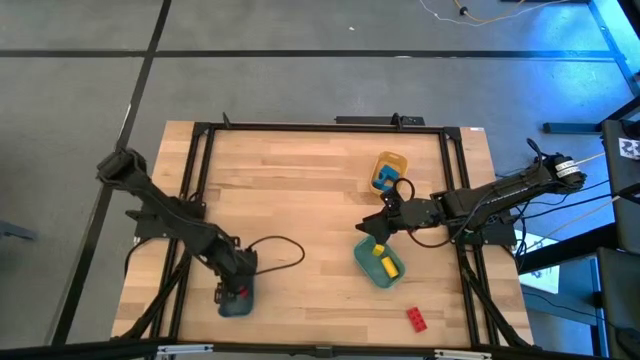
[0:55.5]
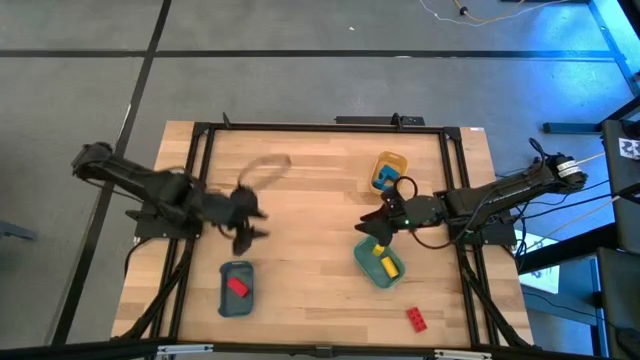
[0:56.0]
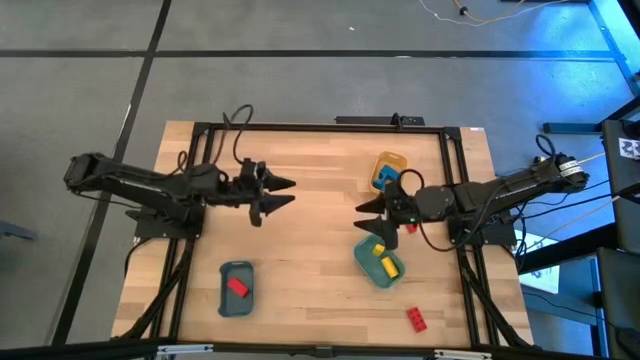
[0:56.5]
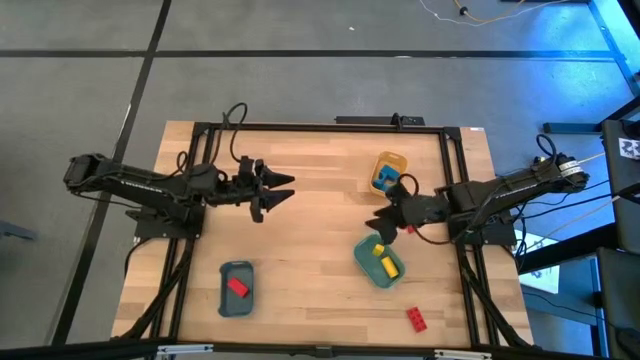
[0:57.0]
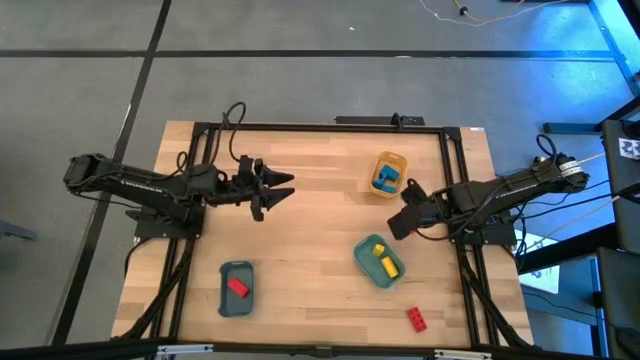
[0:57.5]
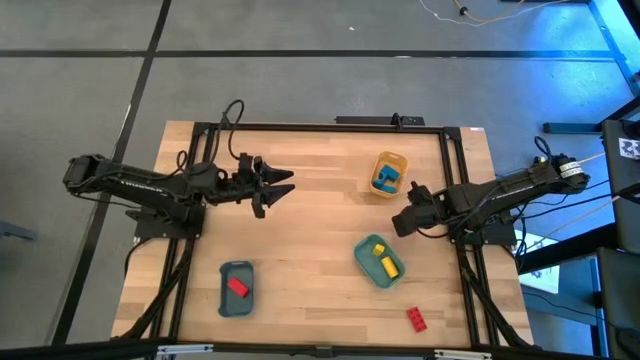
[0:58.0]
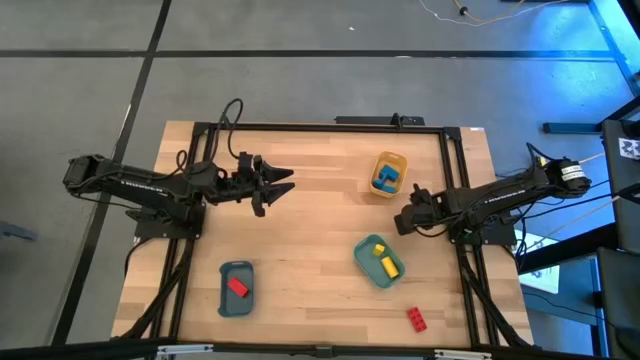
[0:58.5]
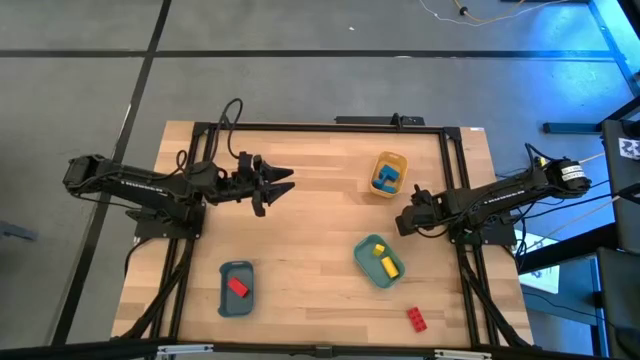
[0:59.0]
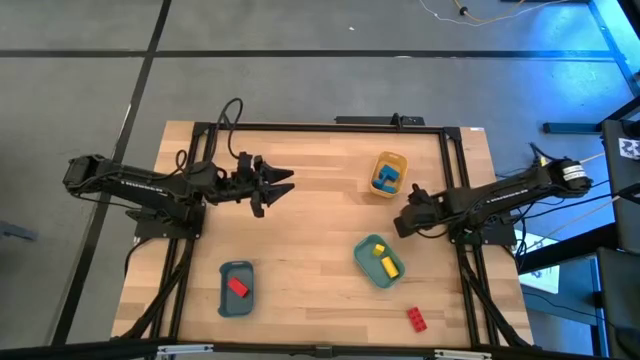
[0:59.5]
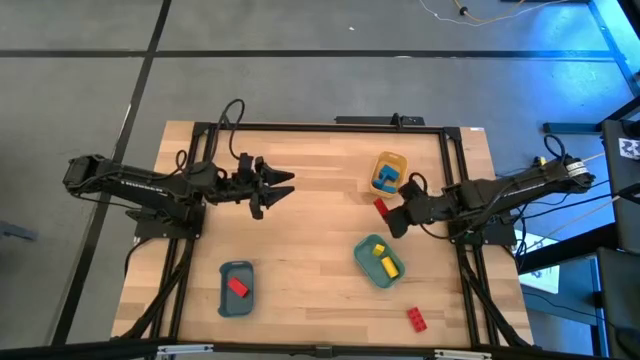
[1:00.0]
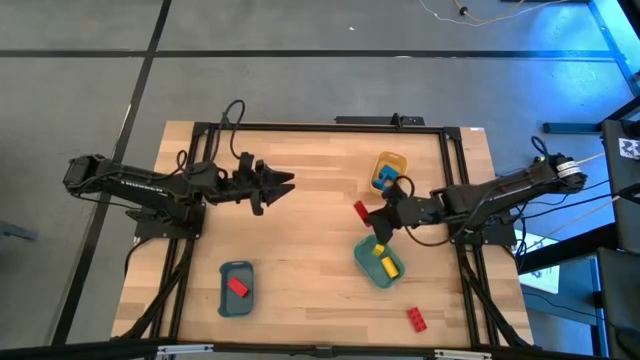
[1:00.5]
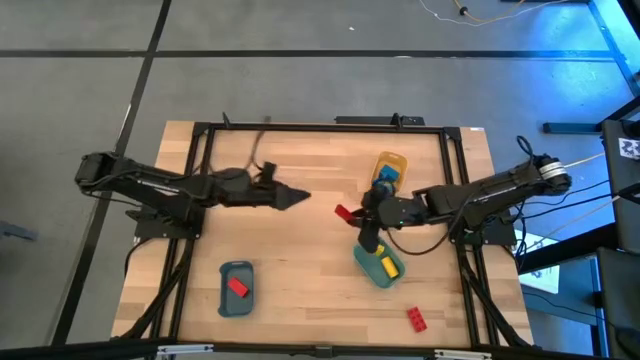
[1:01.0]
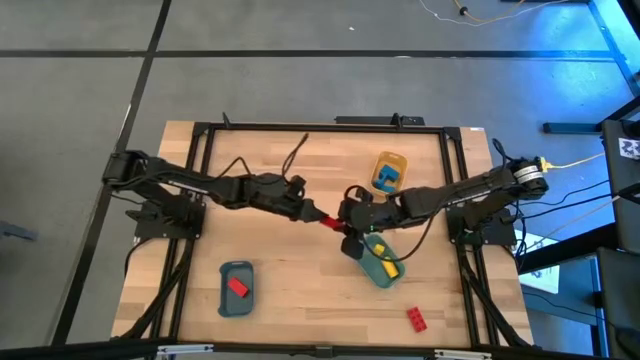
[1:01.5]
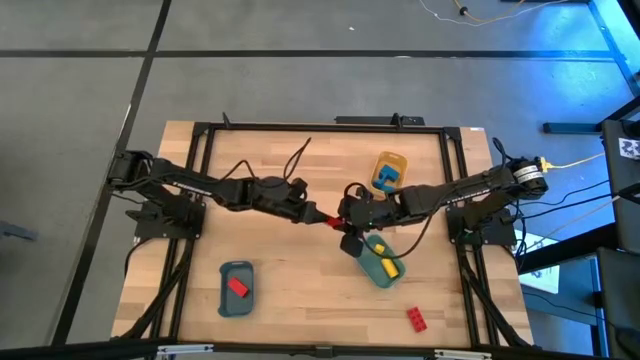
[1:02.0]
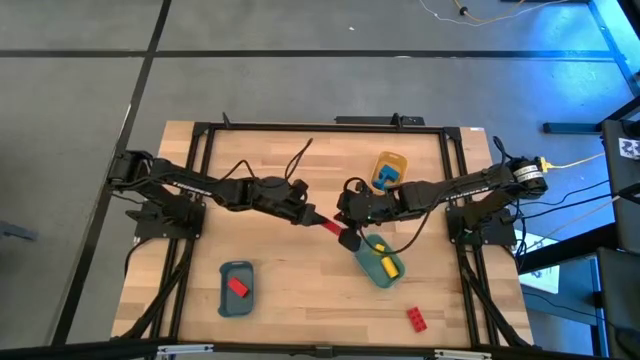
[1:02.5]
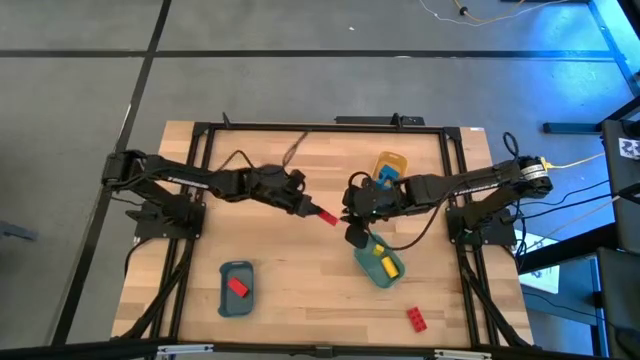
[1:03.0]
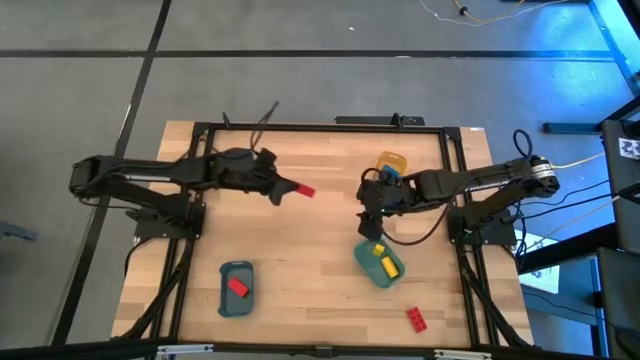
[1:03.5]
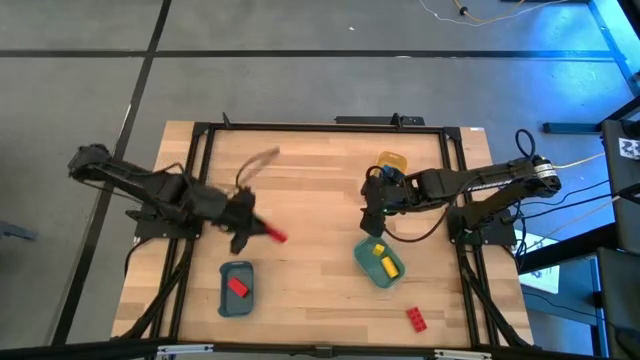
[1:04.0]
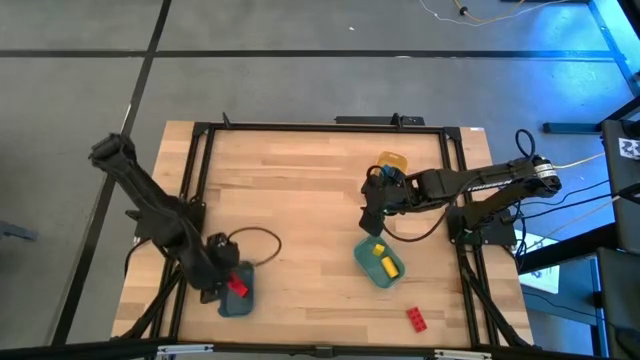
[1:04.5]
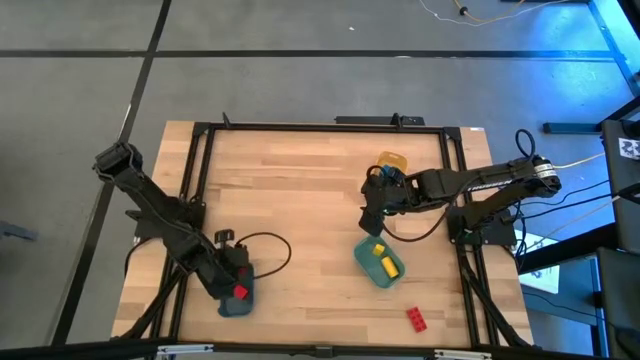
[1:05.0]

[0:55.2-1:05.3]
Task: Sort & place blocks by color
Put the red block into the blue bin

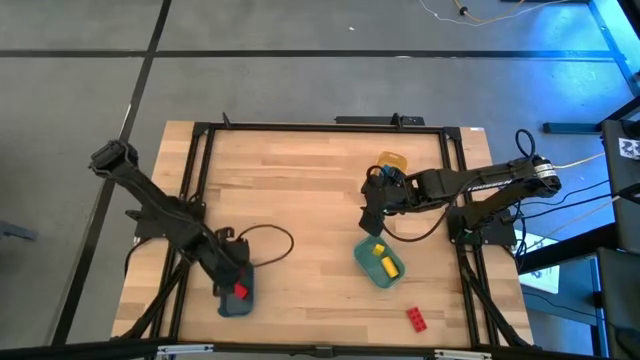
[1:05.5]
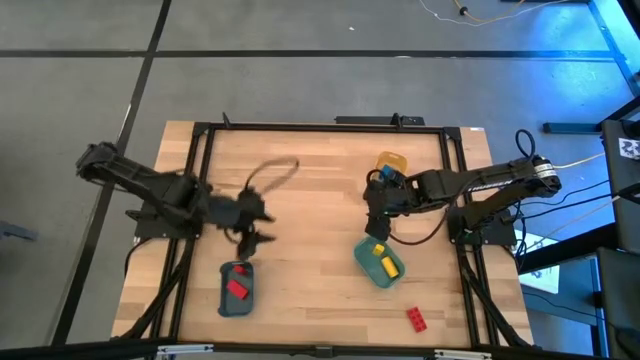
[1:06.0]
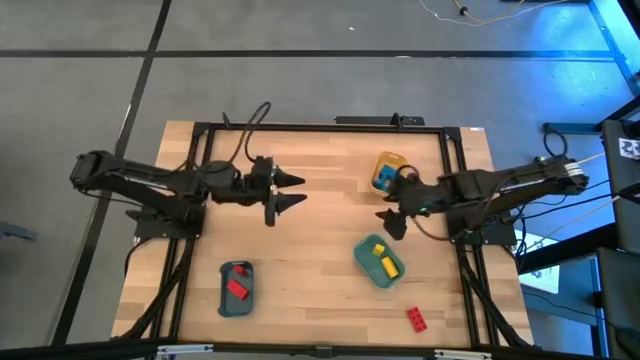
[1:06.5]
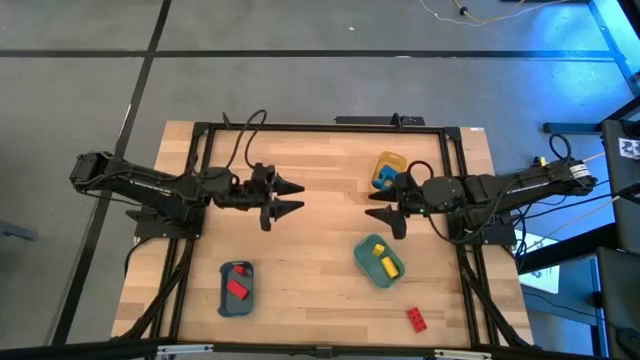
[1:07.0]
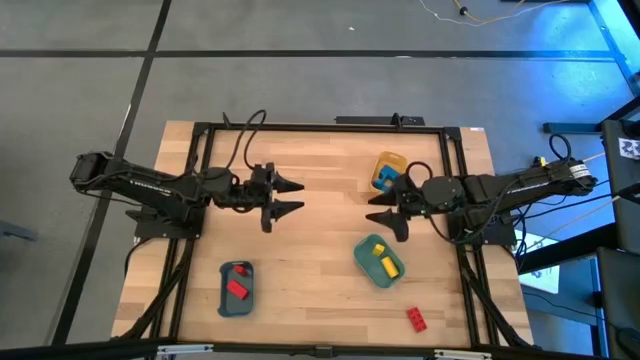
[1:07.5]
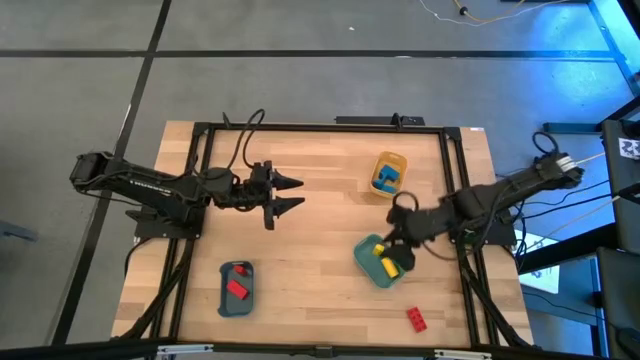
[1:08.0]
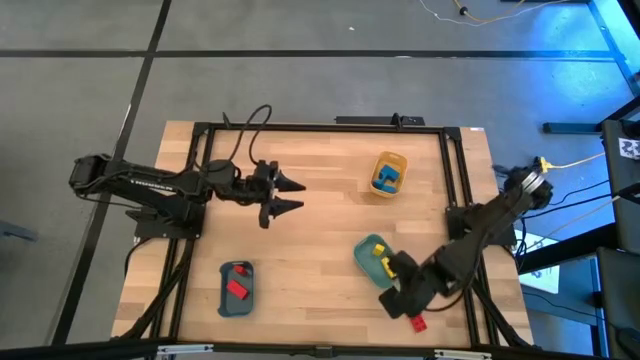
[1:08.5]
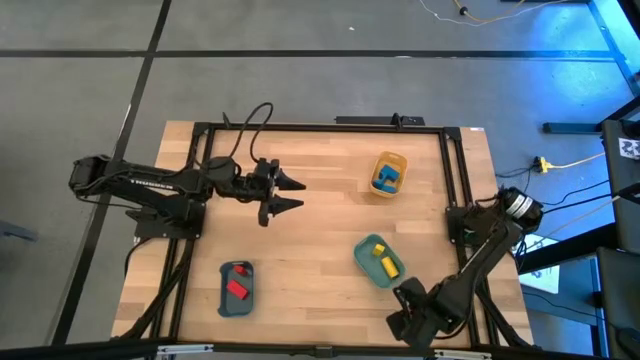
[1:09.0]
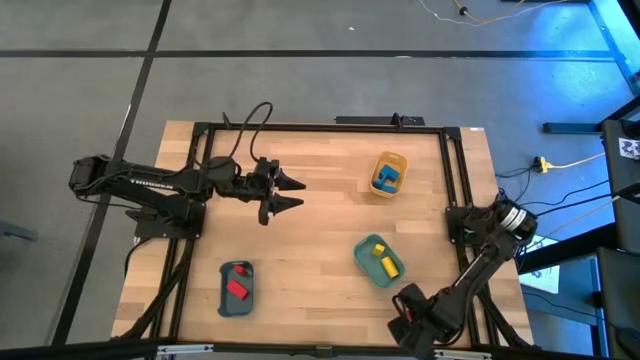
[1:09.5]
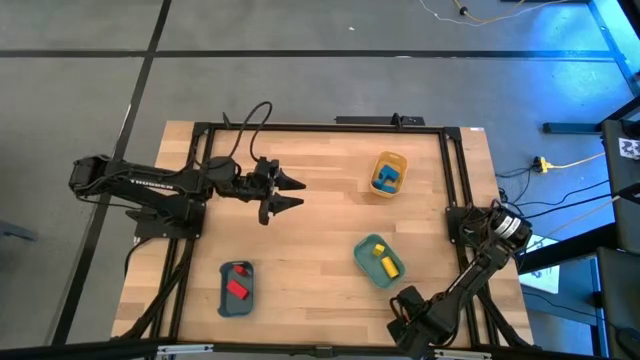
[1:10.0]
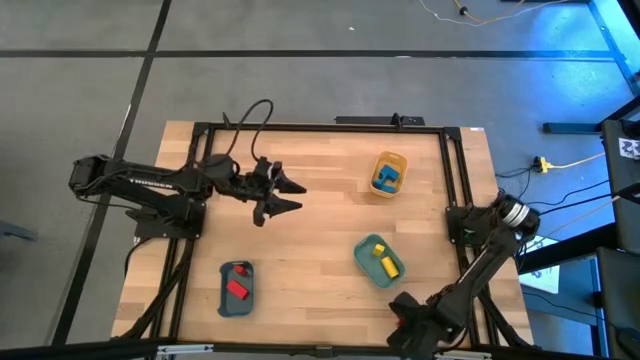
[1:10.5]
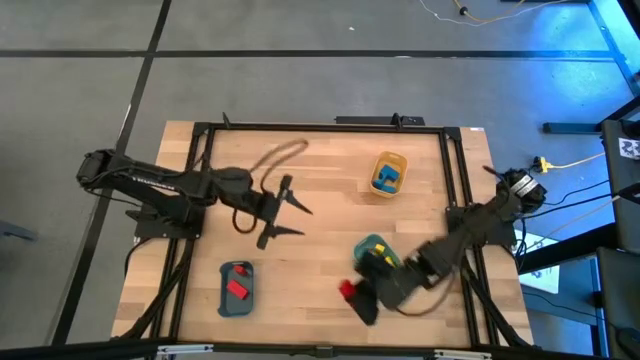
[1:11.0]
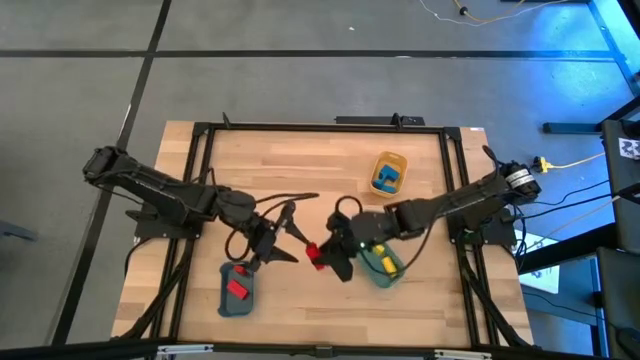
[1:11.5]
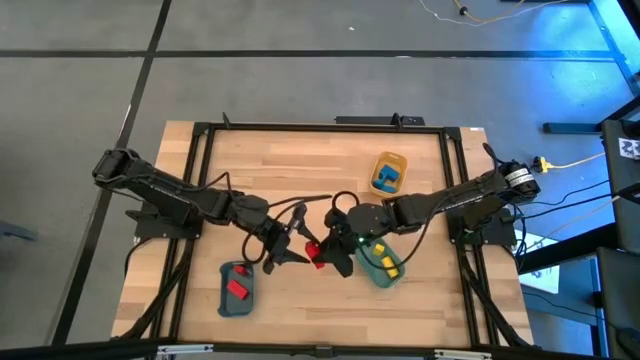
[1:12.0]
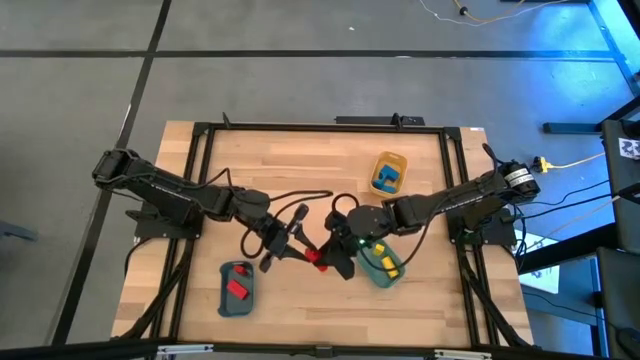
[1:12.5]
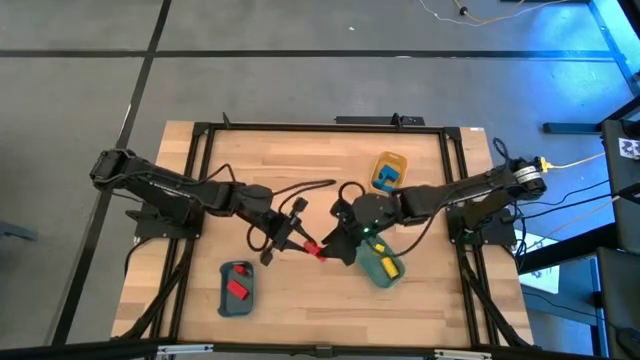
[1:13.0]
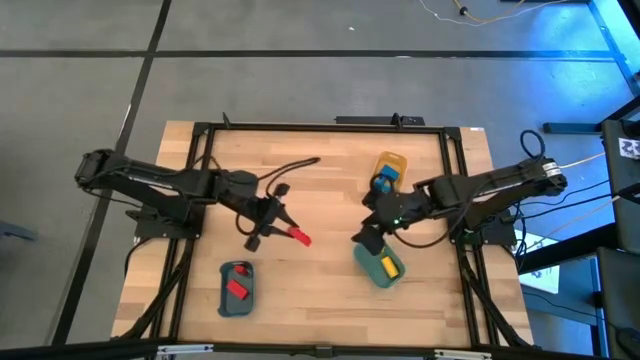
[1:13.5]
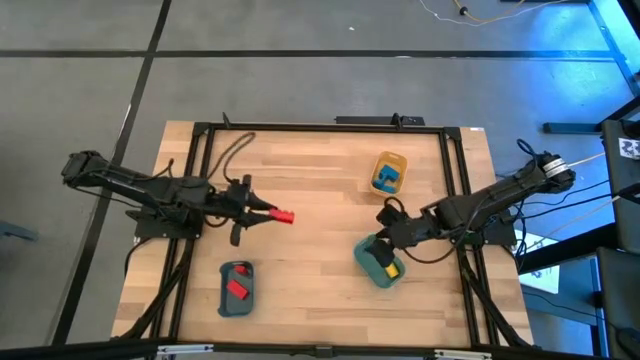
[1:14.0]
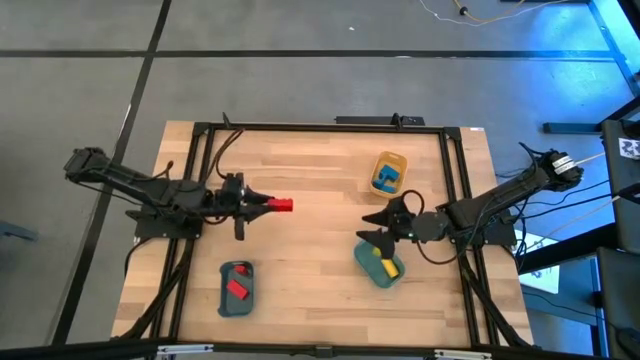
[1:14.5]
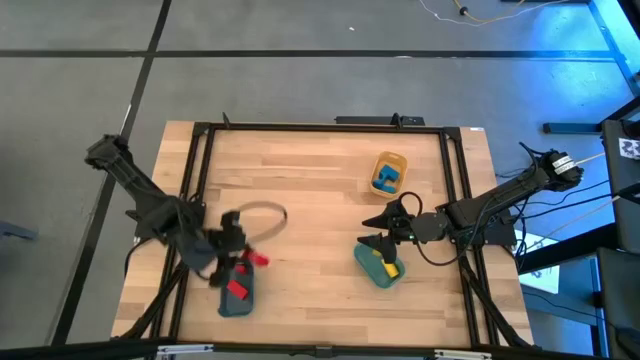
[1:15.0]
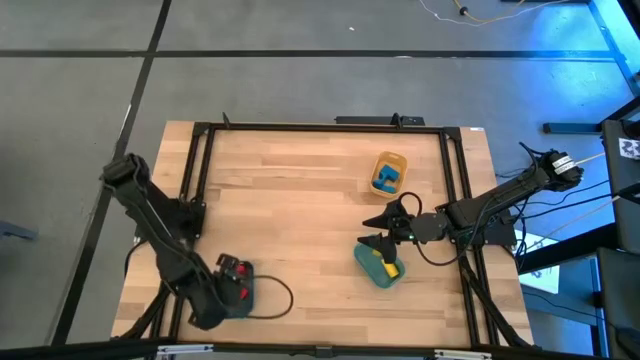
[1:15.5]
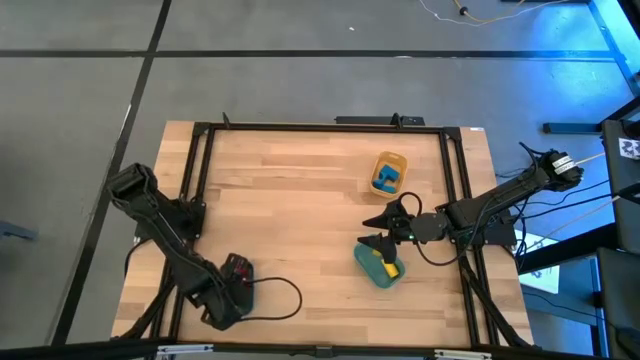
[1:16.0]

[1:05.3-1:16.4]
Put the red game piece into the blue bin
